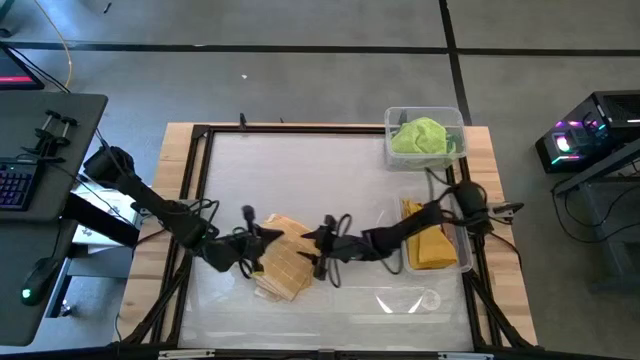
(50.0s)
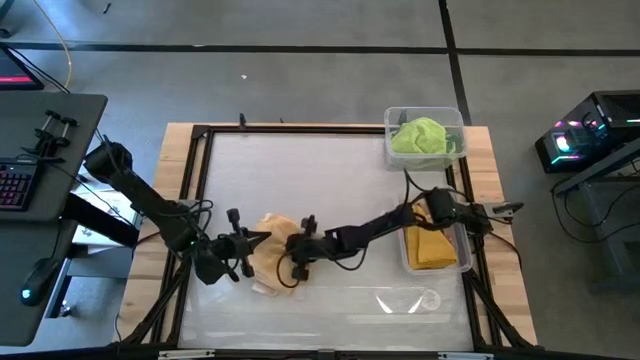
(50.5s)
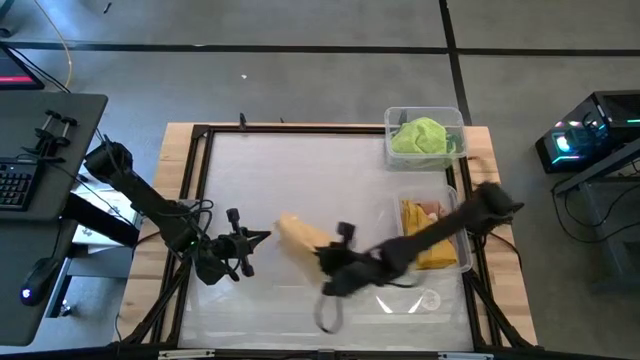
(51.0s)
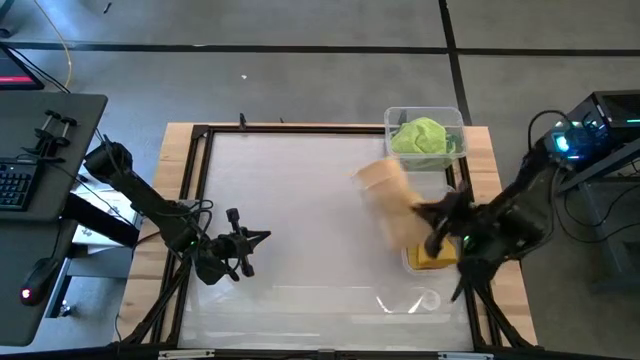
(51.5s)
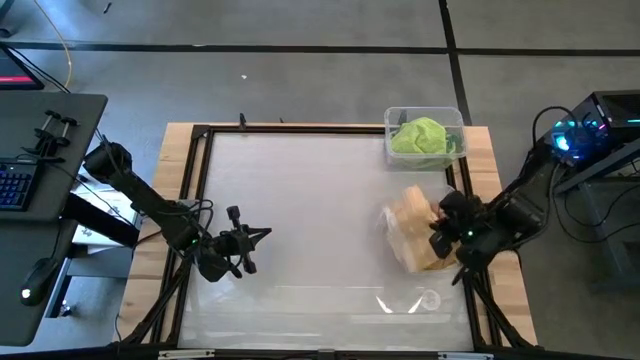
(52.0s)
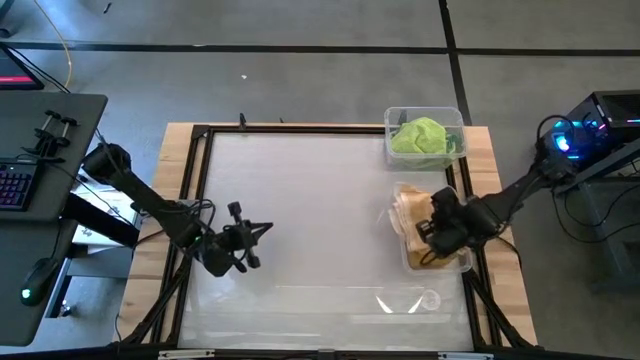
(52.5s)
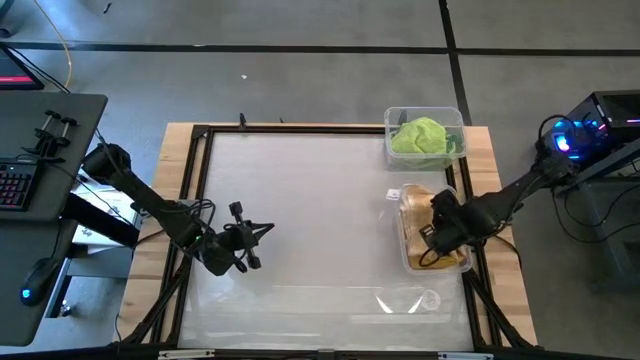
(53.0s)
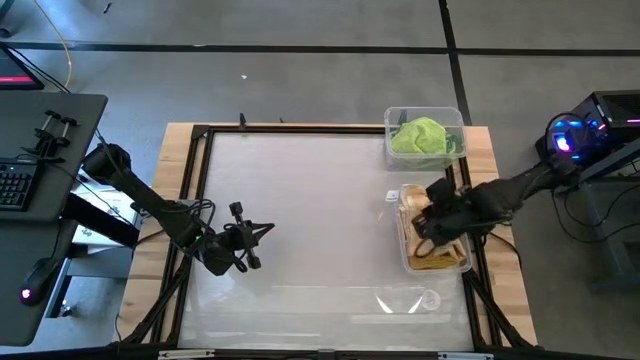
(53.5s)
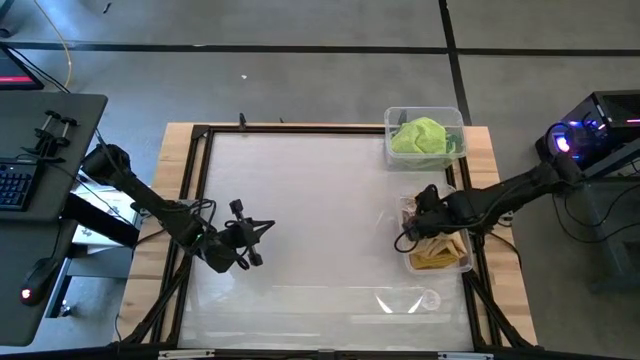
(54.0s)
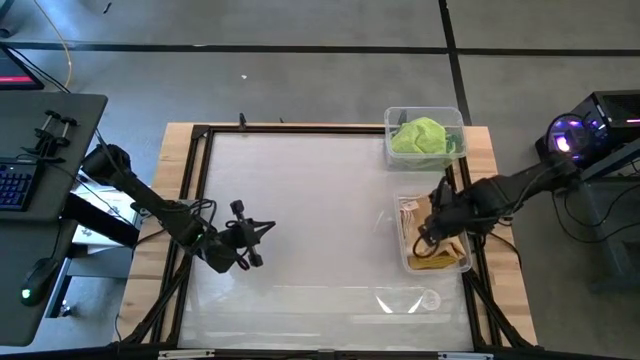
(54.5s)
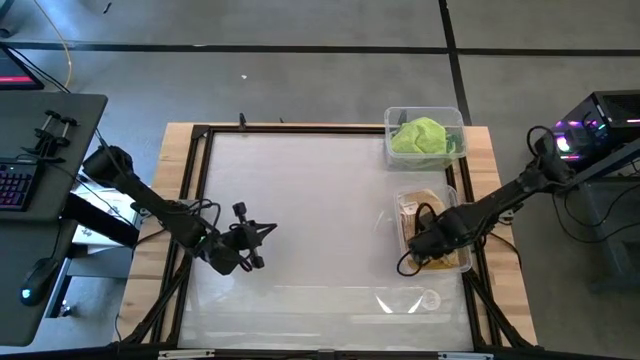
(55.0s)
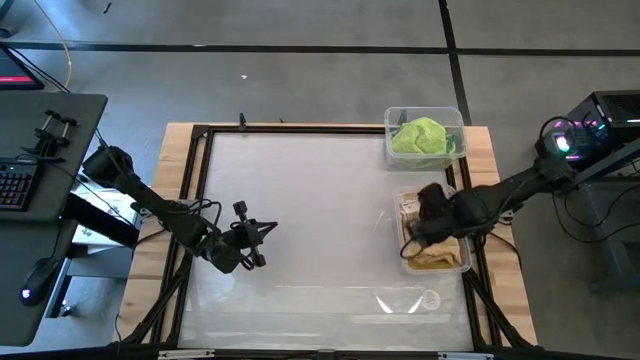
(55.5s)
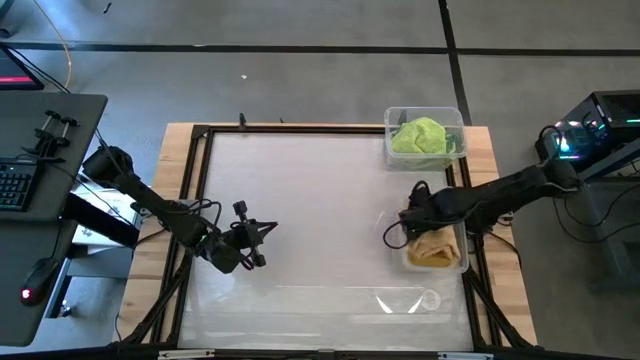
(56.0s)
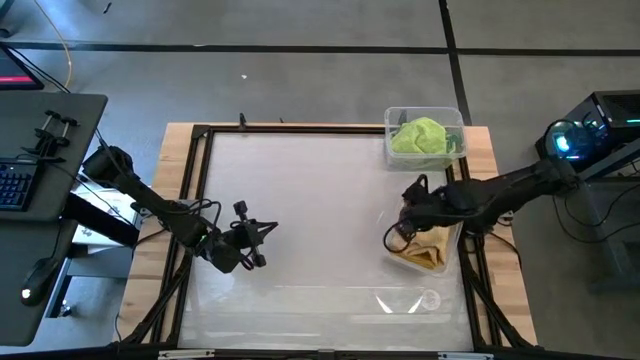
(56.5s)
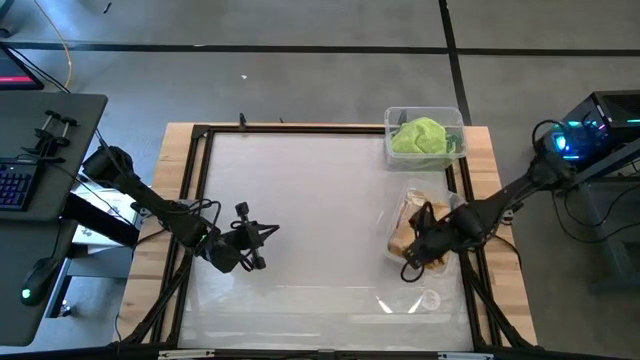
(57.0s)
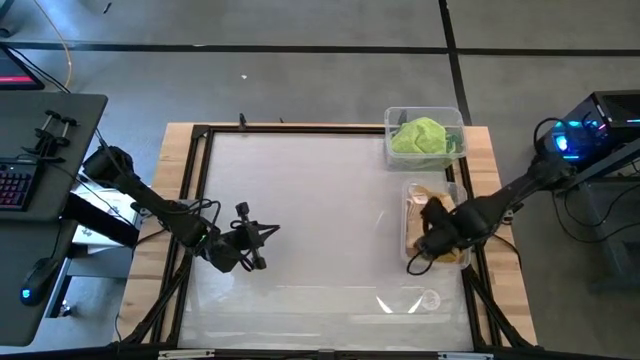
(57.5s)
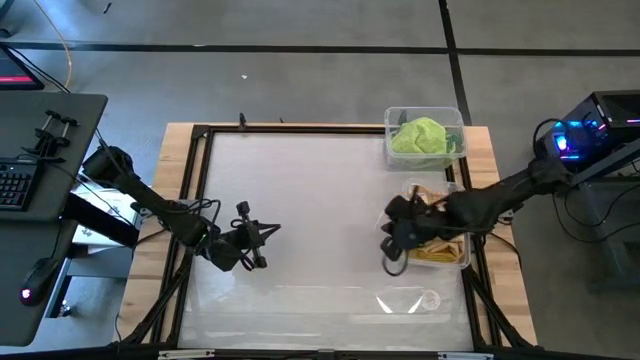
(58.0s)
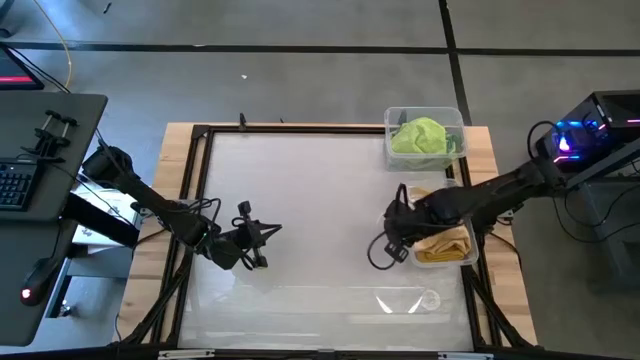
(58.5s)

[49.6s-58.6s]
Task: Sort towels by color in basket
Put the light yellow kitchen towel into the bottom transparent bin

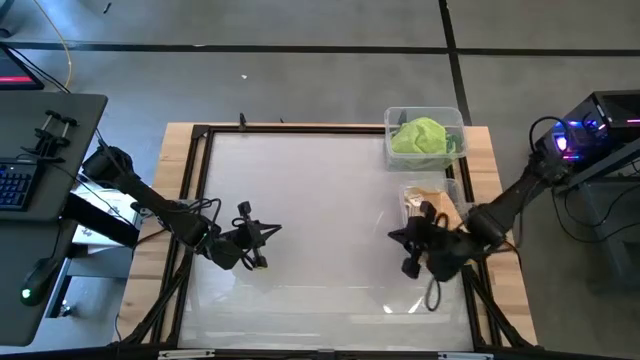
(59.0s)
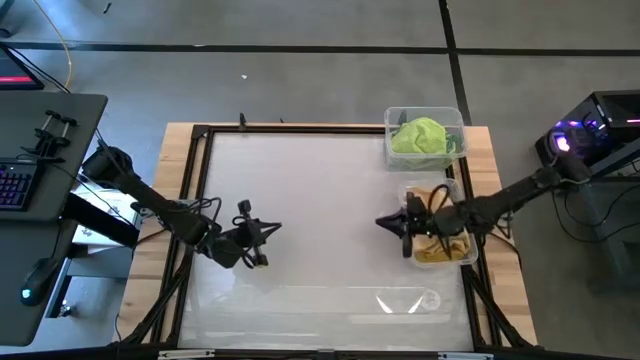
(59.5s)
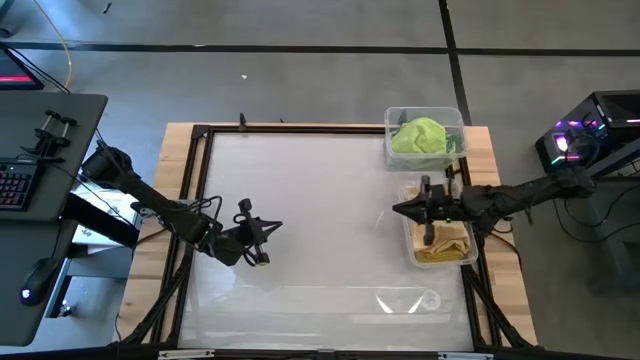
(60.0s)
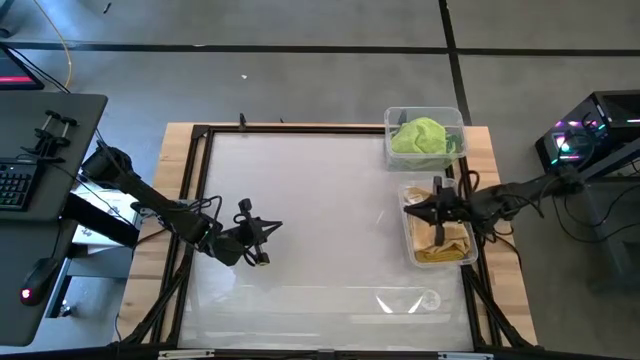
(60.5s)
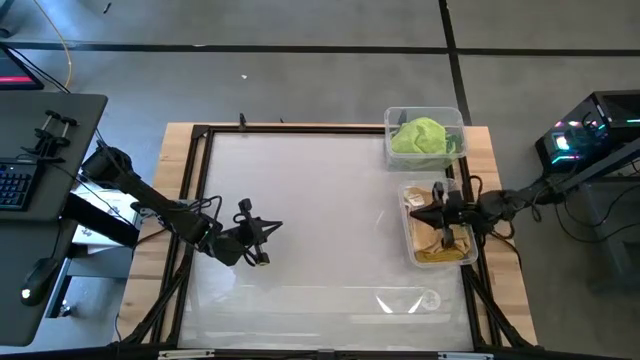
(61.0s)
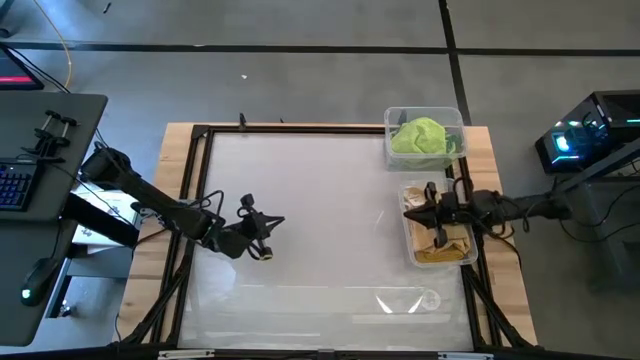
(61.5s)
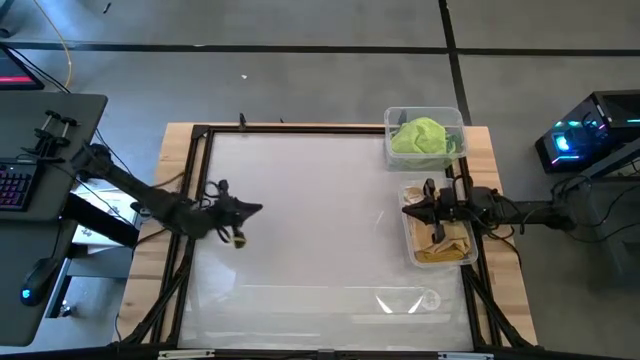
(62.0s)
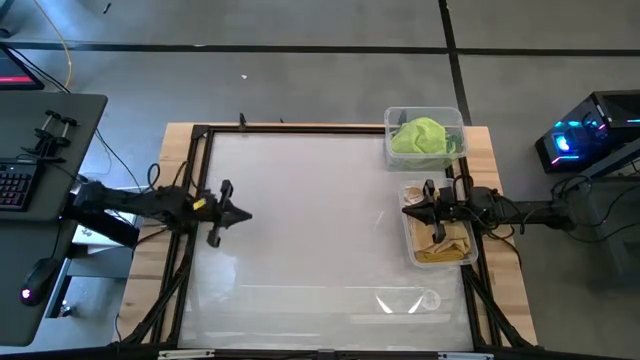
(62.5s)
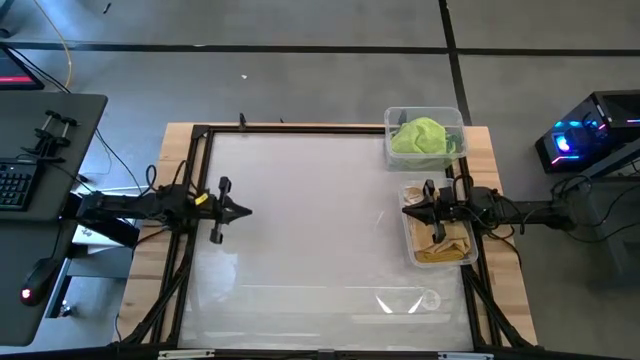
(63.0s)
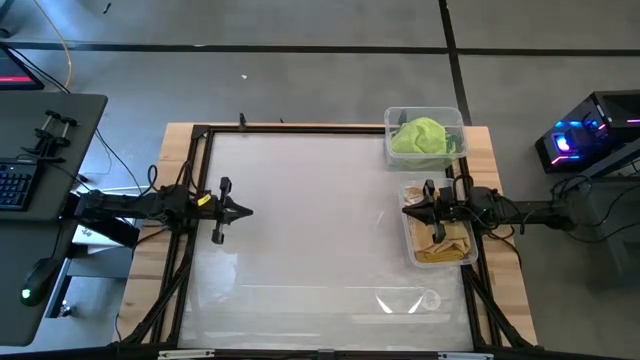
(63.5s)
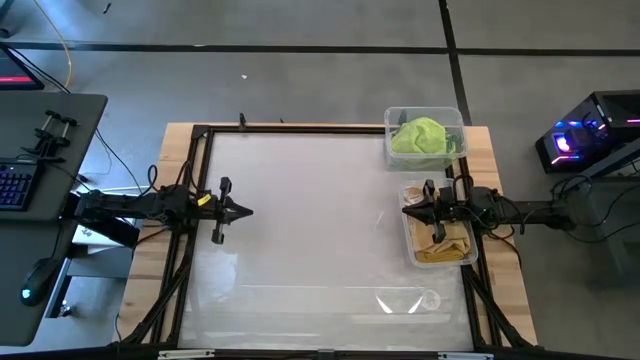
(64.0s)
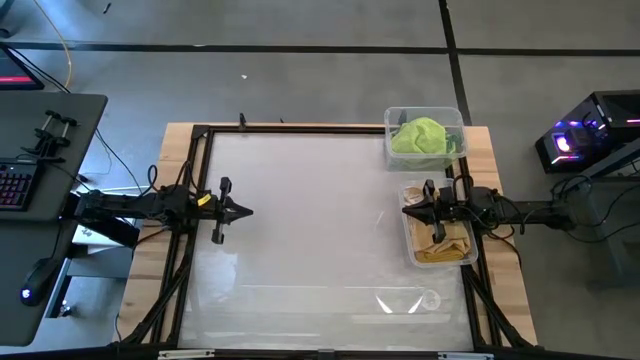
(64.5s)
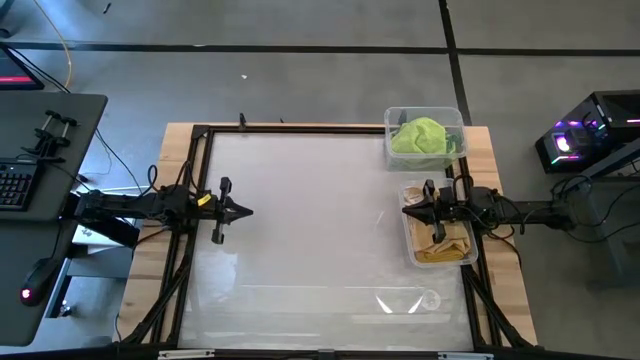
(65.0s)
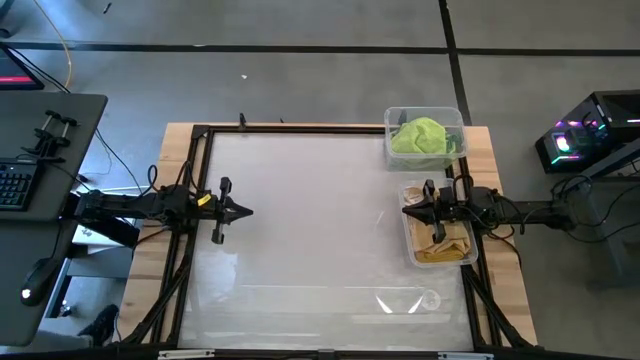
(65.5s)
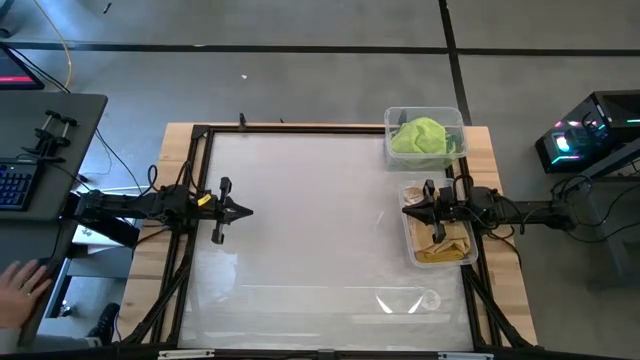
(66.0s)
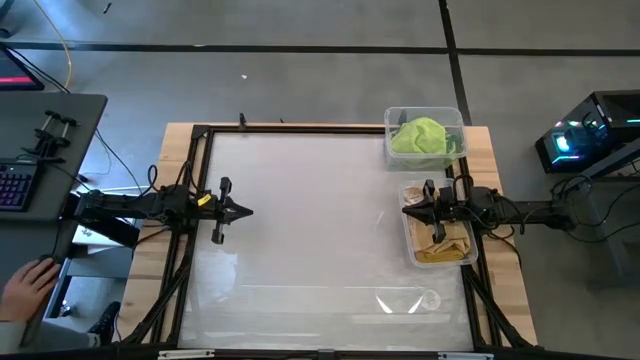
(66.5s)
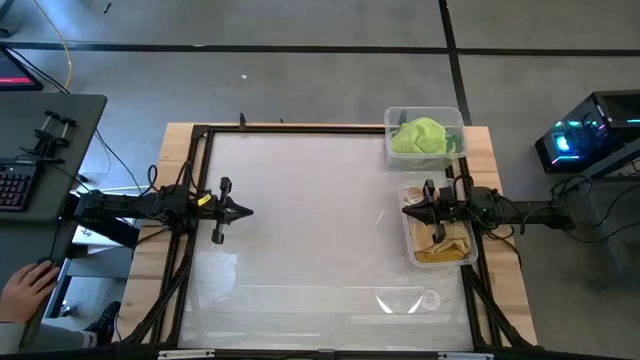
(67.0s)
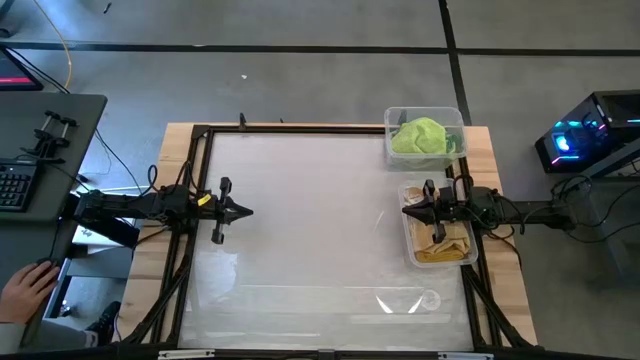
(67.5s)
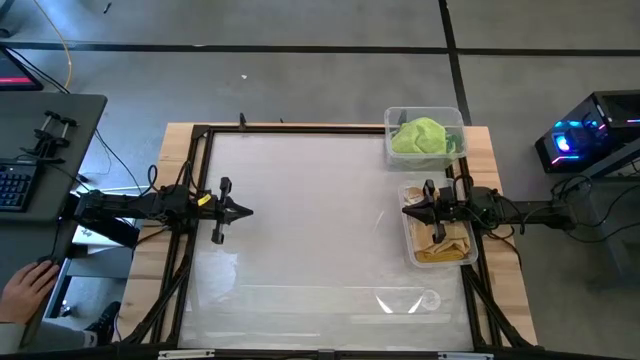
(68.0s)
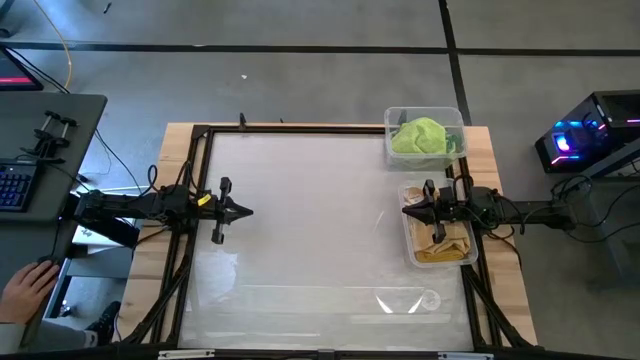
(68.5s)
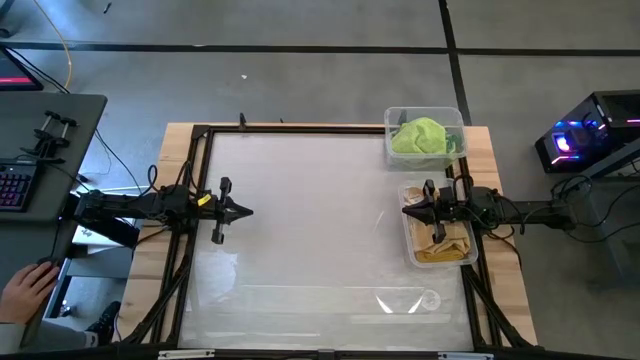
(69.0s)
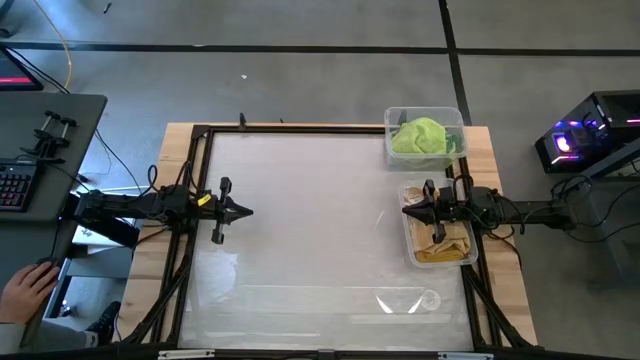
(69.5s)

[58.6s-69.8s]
Return to Home Position

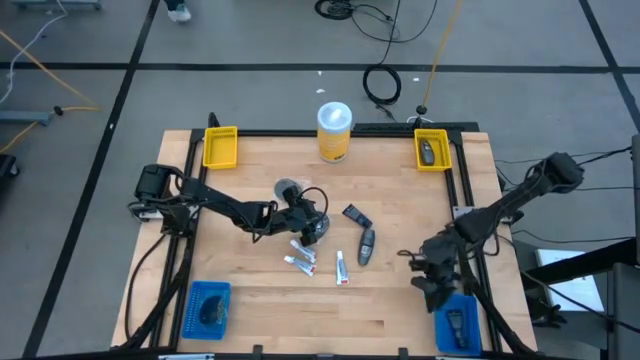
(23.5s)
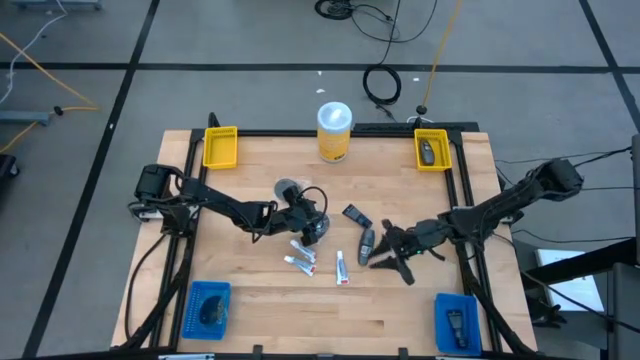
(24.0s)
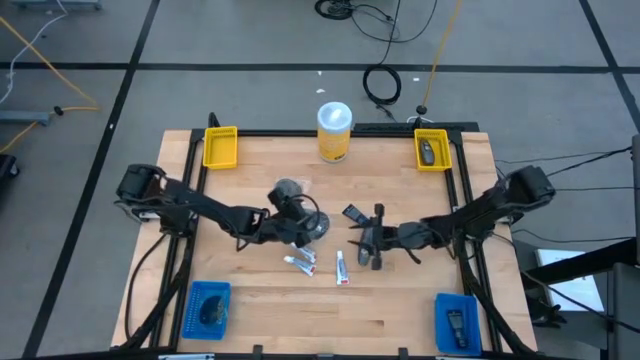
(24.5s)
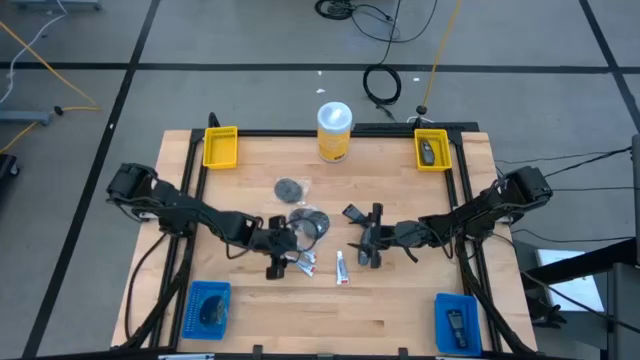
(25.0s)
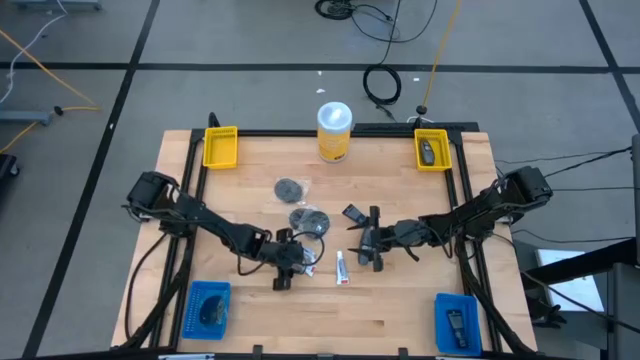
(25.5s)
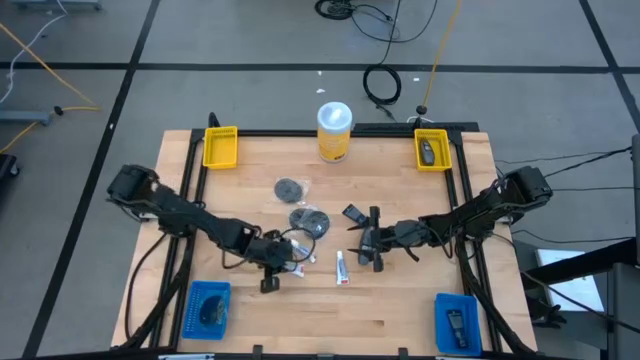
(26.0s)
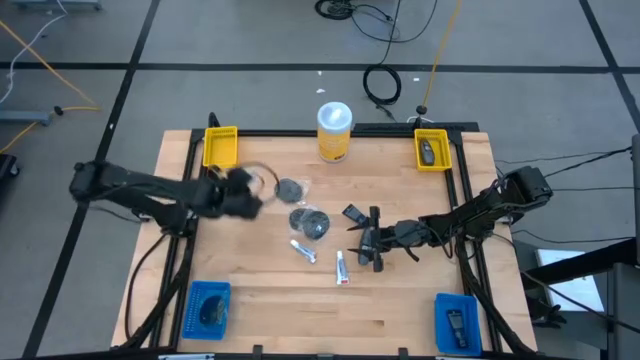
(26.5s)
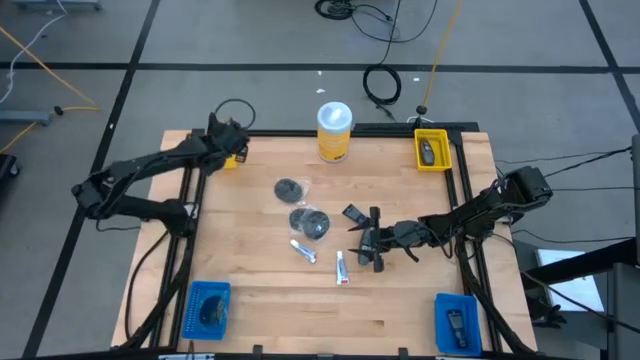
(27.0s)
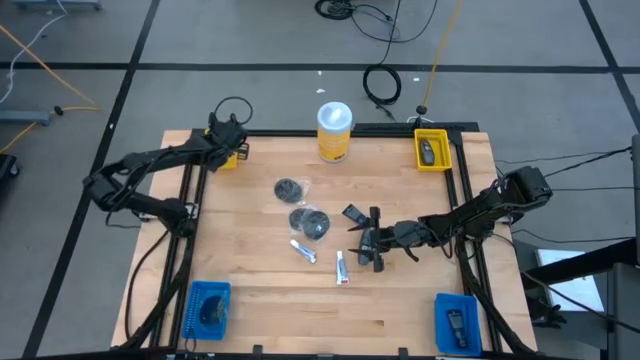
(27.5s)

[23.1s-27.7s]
Task: Pick & Place Travel size toiletries
Put the bottom left white toothpaste into the left yellow bin
